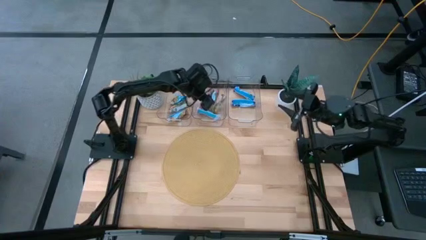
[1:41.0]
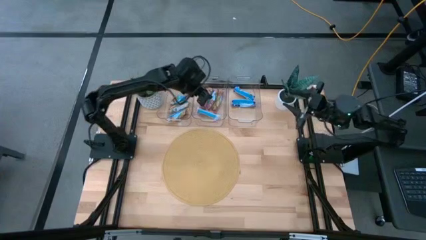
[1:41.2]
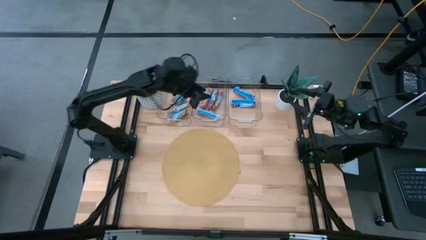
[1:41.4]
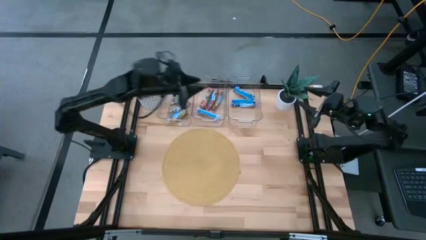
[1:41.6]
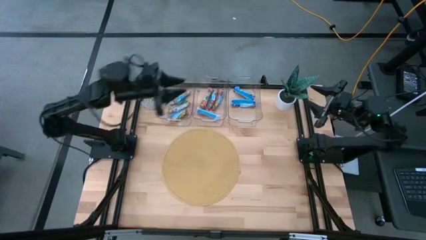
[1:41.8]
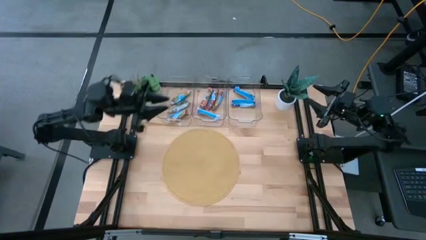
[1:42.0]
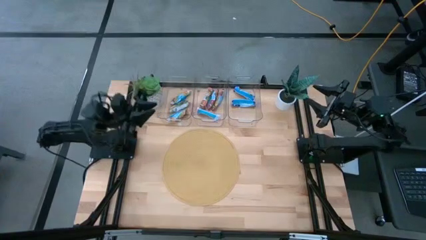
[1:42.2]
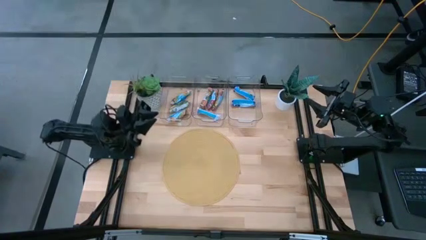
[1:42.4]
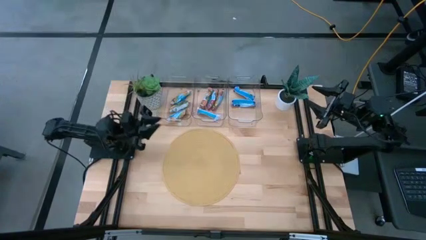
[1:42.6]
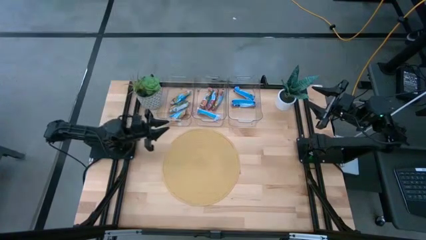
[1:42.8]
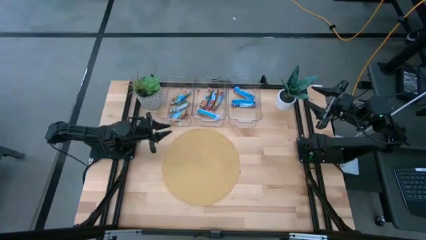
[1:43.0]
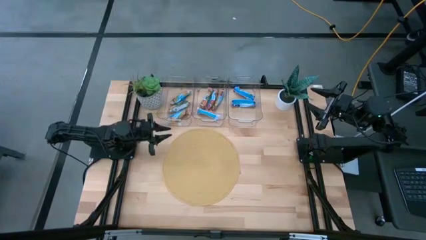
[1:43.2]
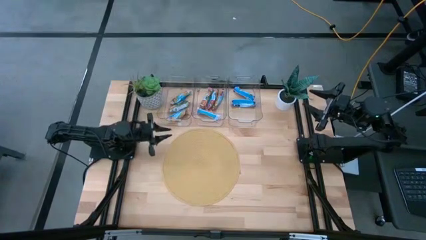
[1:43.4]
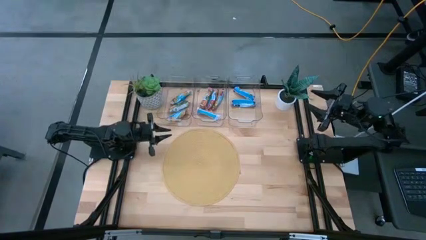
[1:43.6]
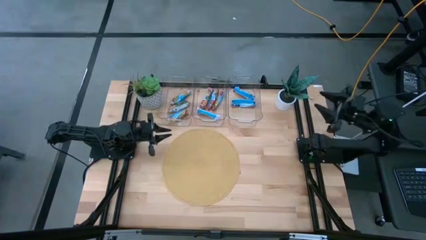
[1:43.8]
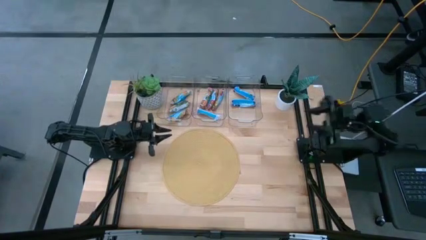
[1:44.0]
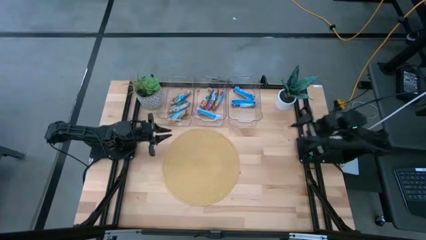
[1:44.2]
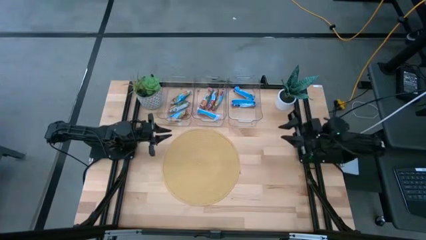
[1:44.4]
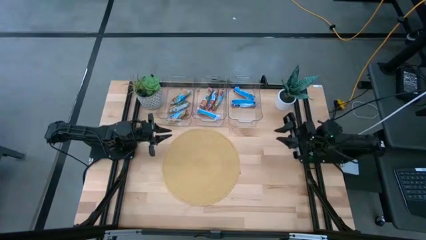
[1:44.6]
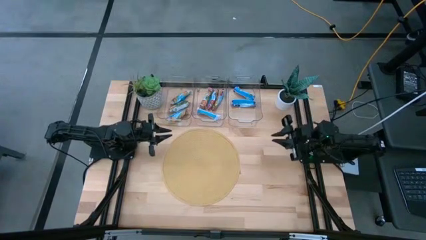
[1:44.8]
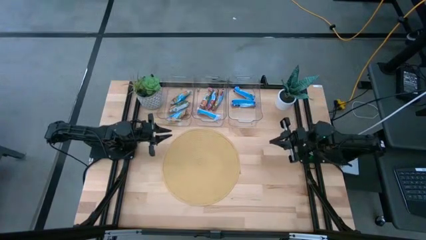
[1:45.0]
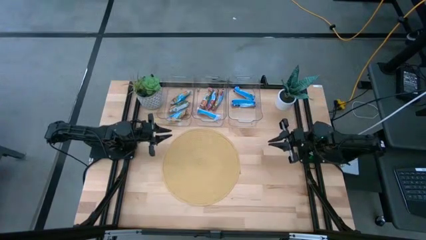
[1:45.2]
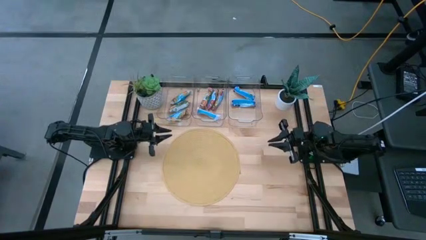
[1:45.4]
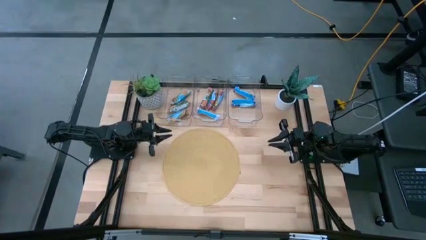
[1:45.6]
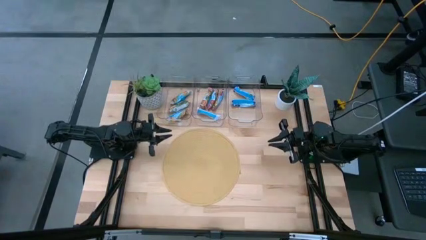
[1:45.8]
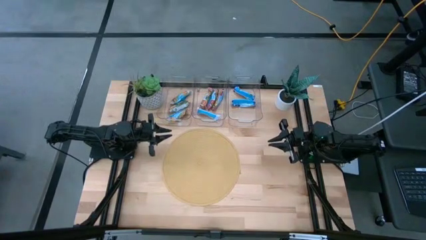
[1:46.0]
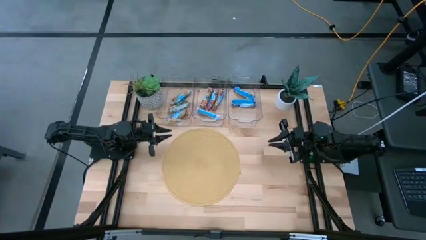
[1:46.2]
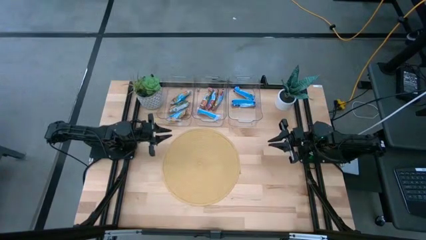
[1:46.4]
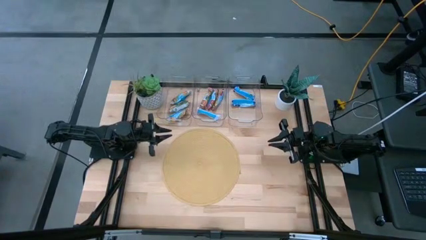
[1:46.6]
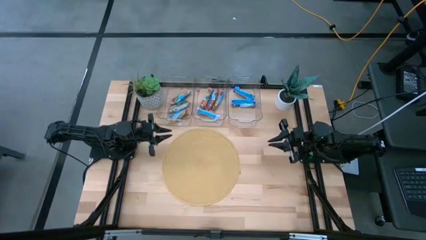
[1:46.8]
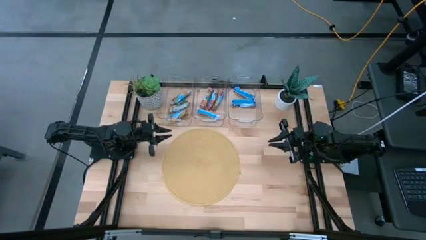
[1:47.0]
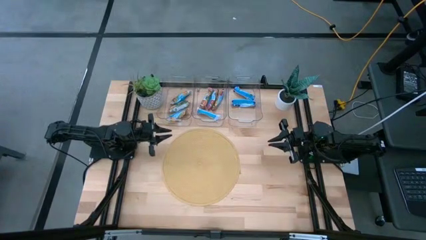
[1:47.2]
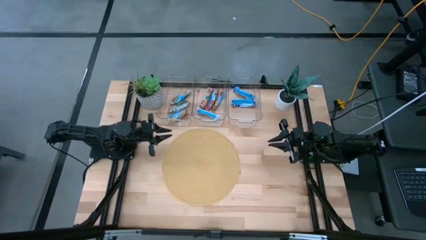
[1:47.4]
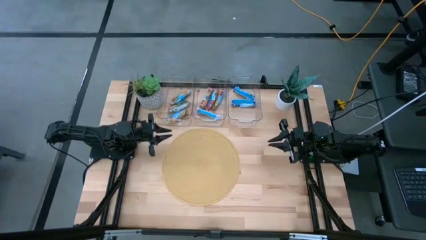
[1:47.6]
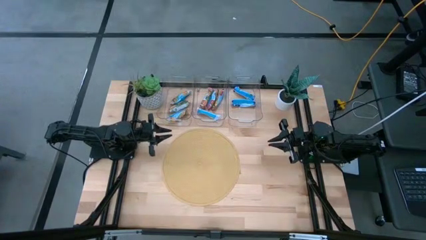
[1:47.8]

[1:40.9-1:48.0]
Task: Pick and place Granola Bars by type
Return to Home Position

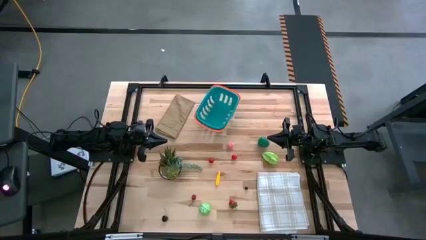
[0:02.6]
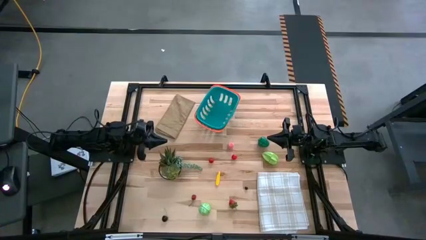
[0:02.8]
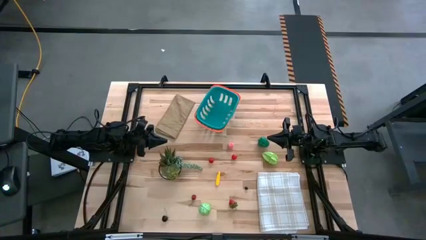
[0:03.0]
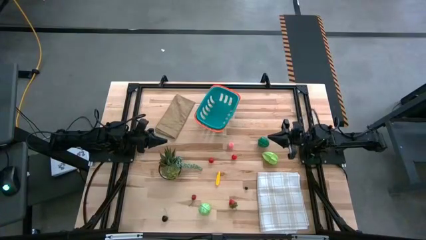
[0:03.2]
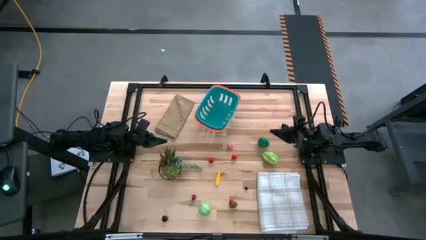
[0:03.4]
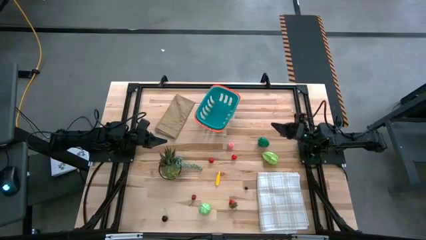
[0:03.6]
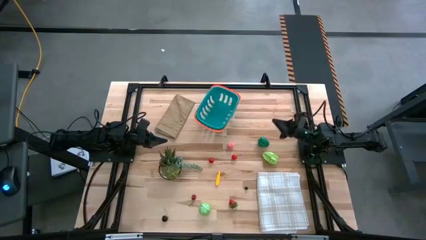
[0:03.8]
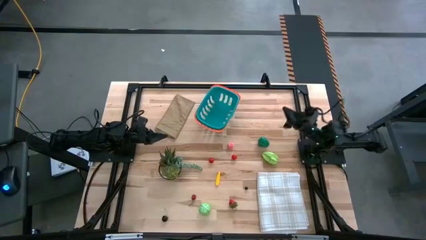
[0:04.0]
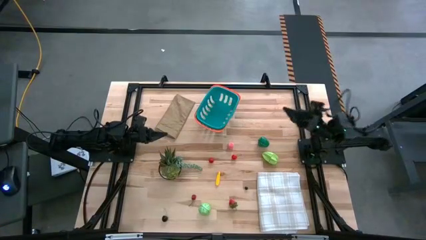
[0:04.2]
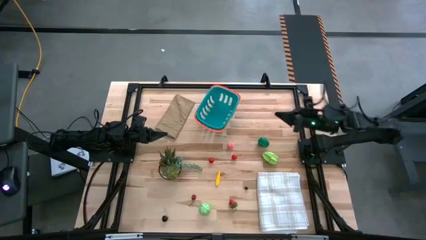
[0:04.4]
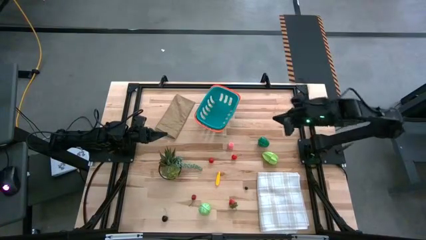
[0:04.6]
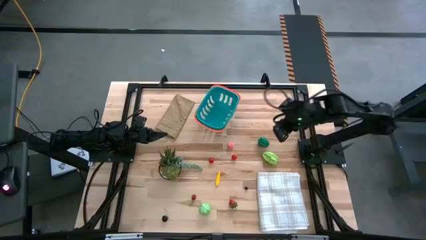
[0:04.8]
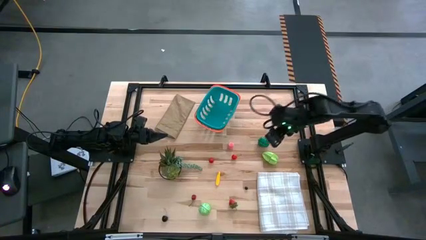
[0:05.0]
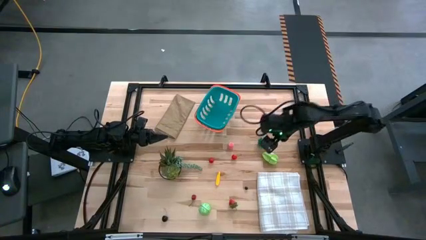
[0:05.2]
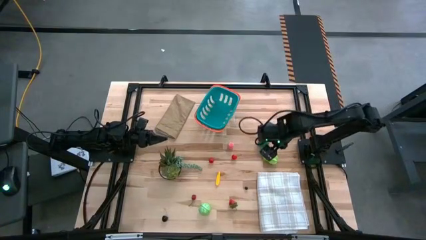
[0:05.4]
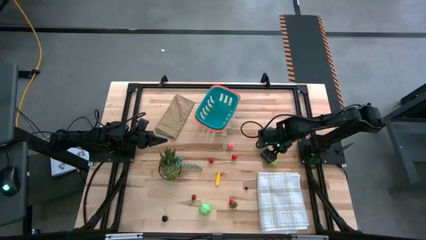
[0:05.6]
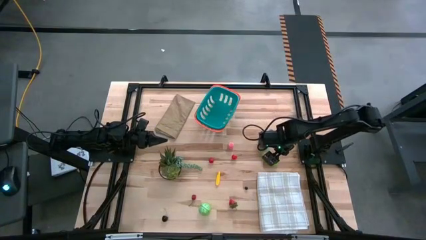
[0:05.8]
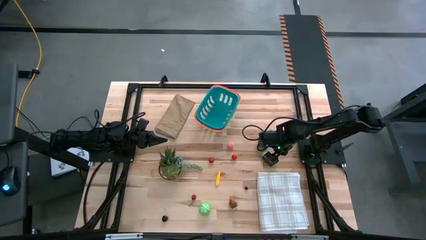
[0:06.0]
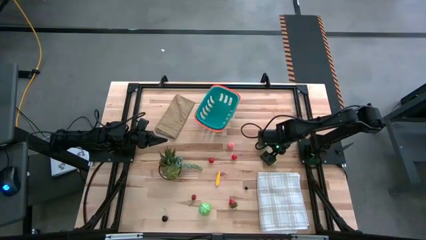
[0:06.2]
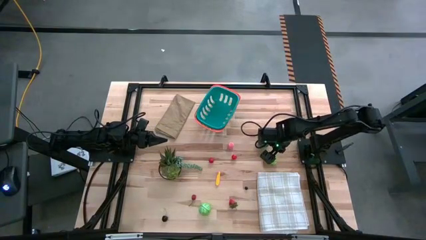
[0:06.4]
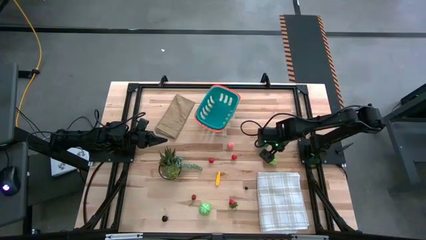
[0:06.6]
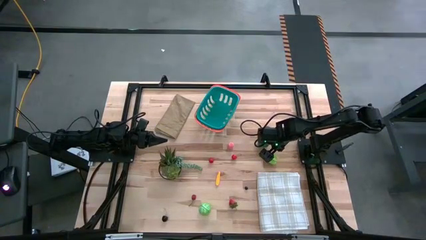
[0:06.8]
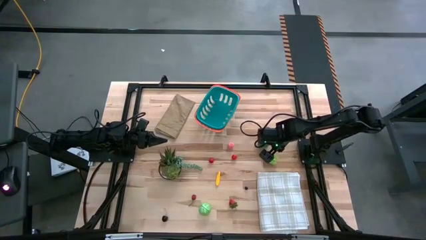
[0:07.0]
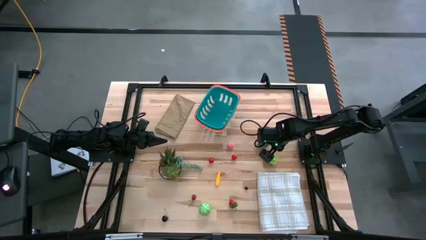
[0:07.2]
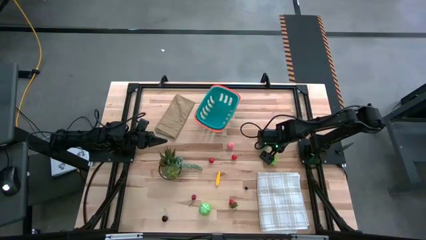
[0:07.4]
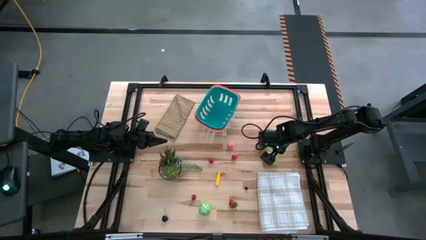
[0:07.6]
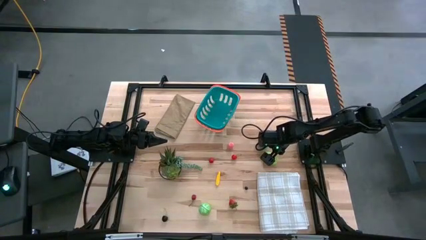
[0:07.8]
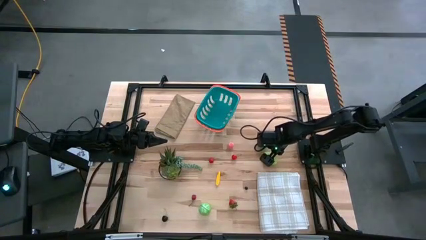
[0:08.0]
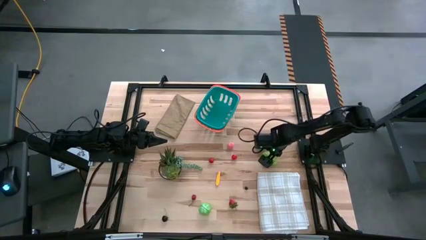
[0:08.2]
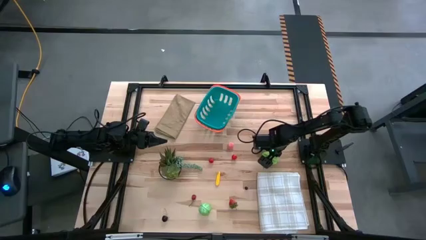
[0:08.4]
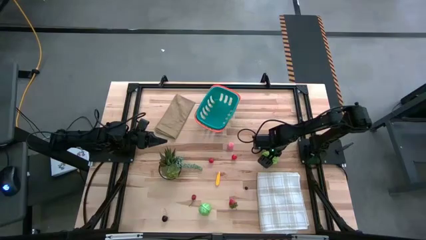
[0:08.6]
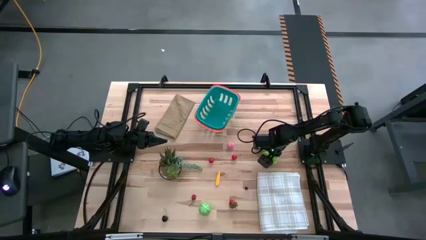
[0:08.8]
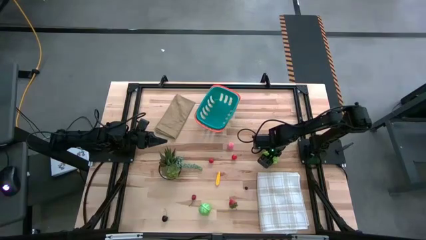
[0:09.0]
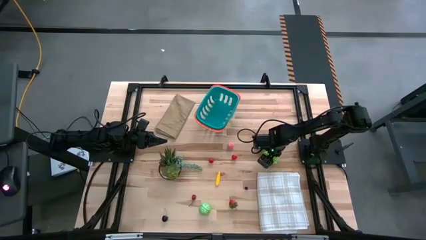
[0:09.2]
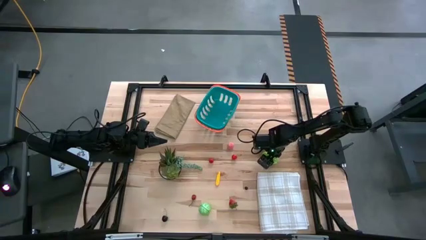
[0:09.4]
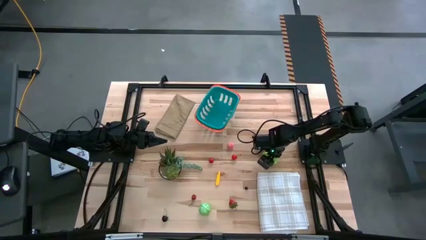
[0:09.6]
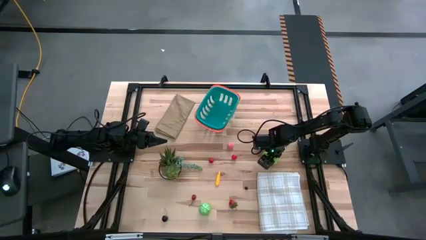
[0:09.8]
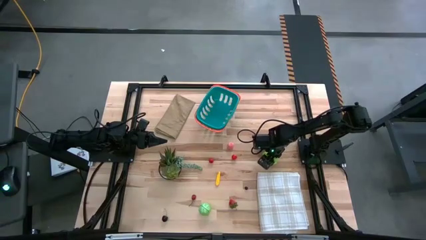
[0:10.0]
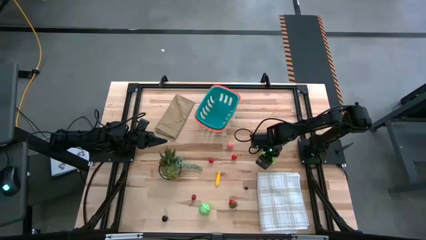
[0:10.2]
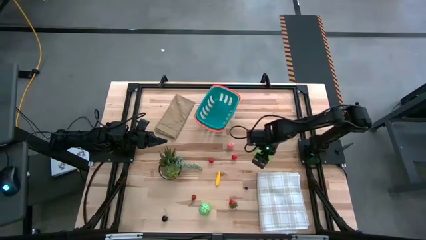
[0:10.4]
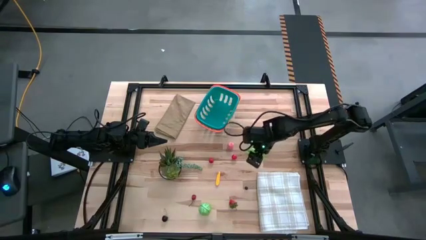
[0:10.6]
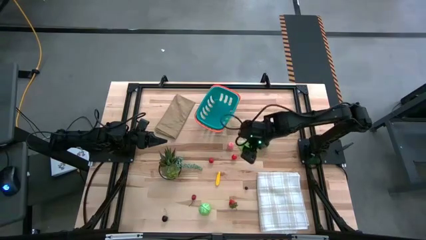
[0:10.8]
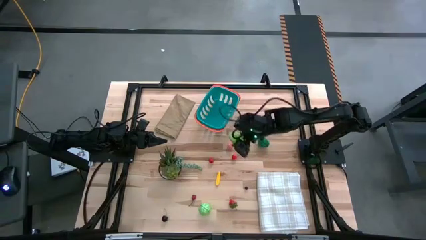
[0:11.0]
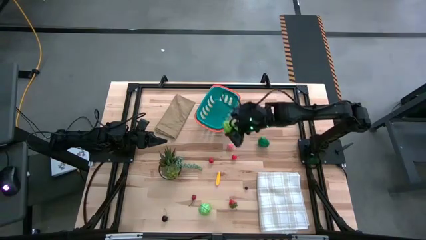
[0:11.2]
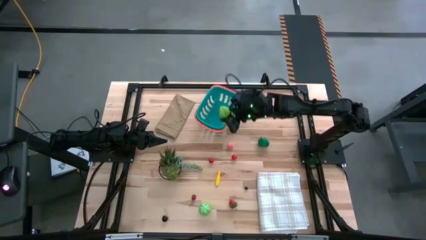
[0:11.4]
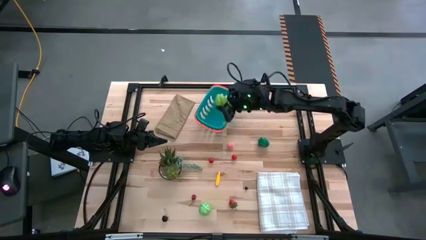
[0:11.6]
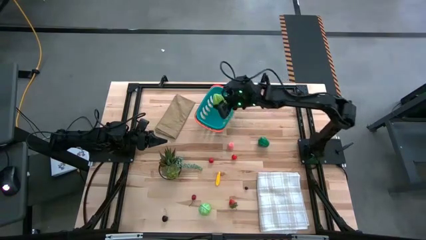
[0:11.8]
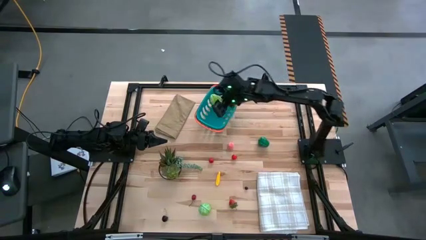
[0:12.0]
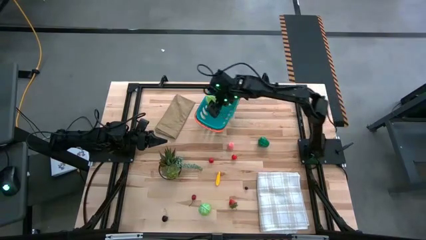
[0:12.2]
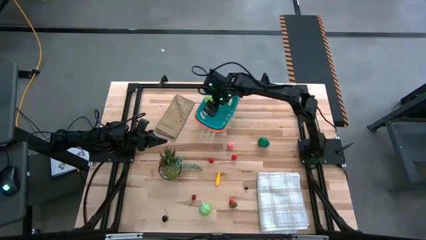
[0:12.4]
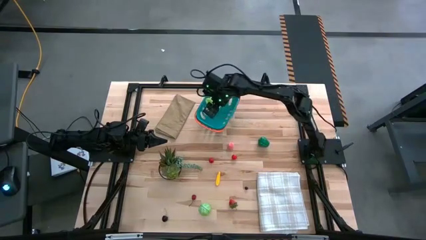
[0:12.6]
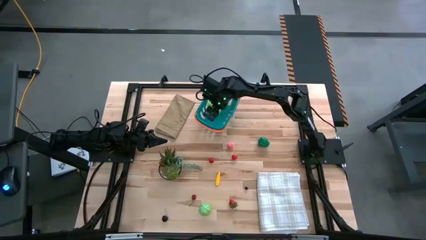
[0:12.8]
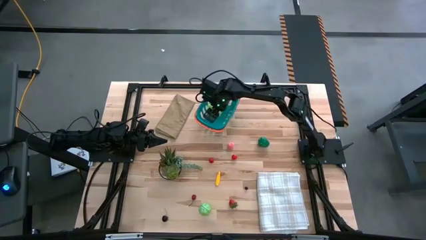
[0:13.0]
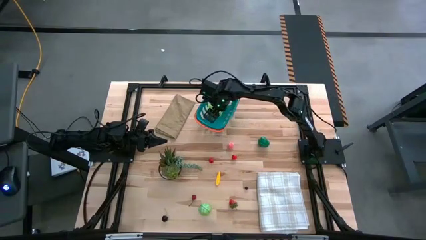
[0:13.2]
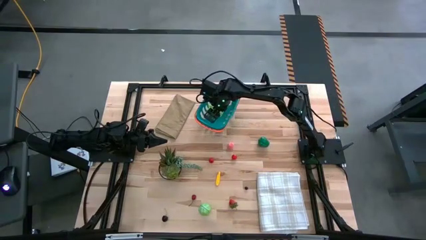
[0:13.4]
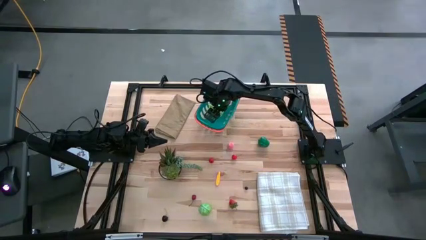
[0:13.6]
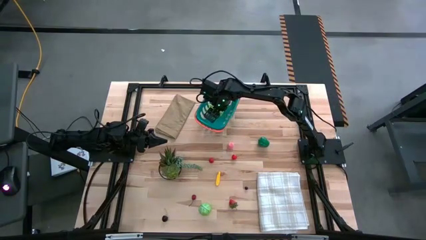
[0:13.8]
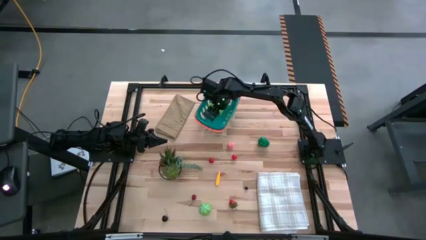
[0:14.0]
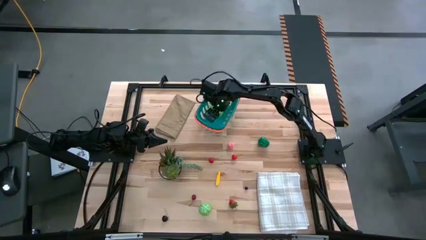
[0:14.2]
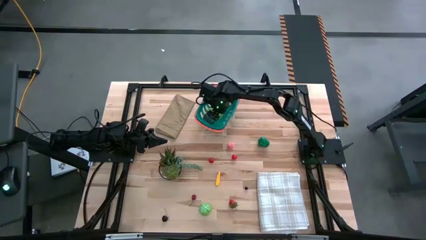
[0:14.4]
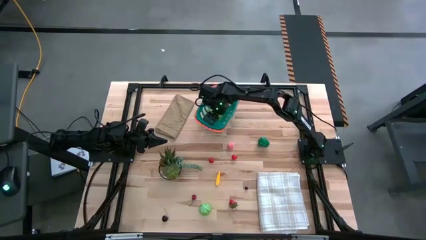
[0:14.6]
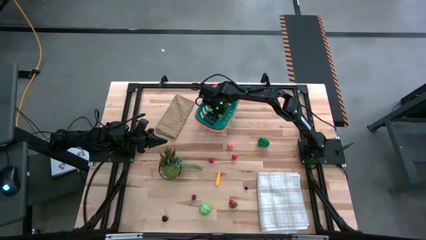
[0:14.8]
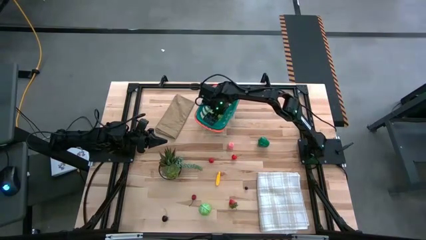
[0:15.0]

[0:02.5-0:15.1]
Task: Pick and placing Produce into tupperware
Put the green star fruit in the green basket
